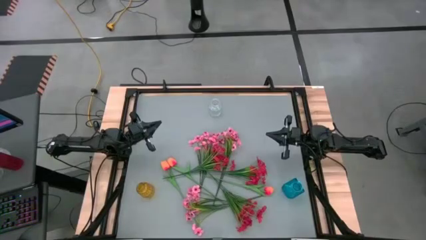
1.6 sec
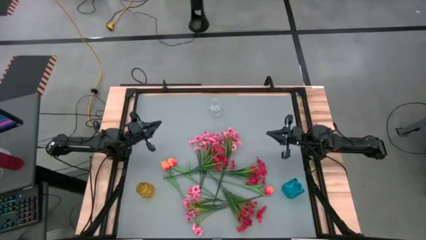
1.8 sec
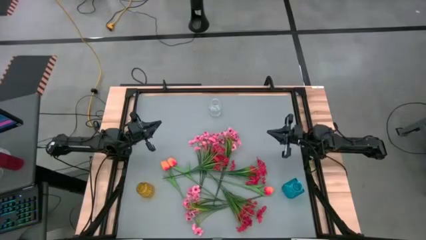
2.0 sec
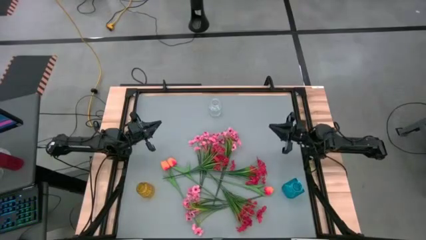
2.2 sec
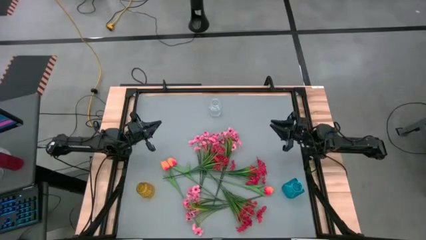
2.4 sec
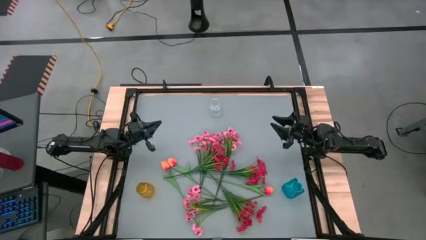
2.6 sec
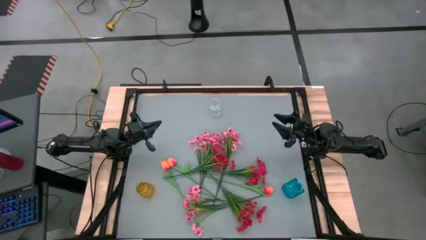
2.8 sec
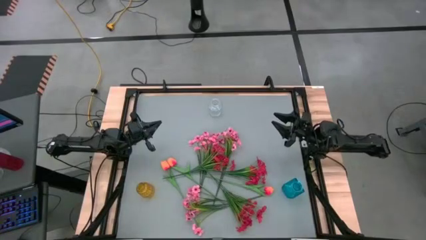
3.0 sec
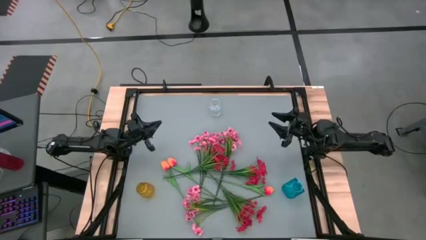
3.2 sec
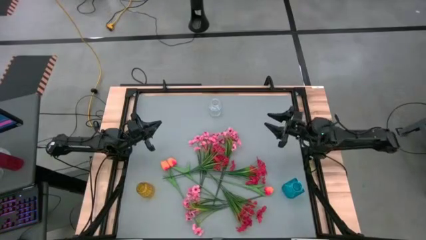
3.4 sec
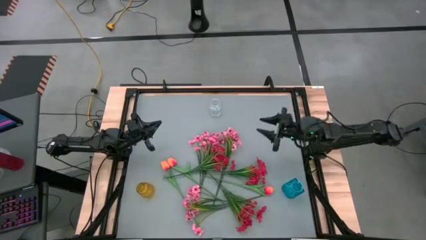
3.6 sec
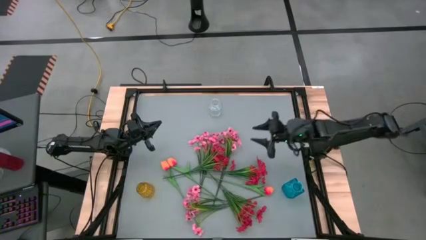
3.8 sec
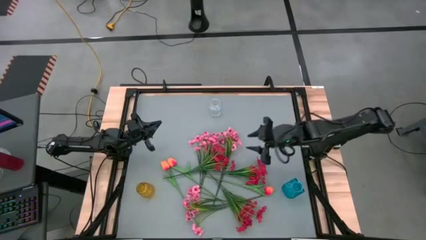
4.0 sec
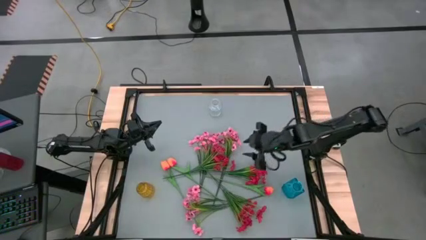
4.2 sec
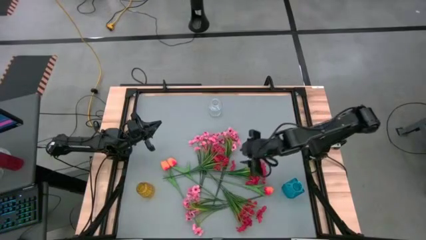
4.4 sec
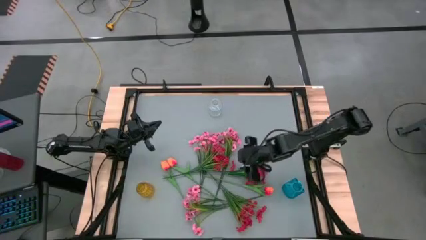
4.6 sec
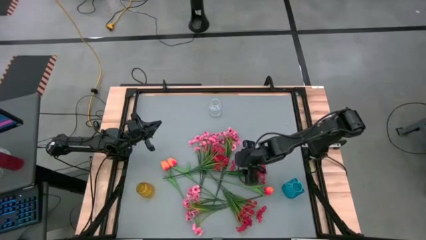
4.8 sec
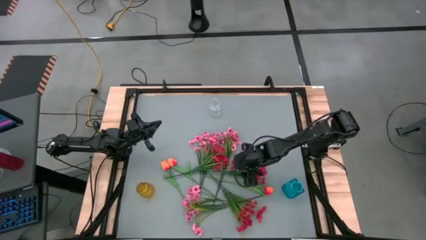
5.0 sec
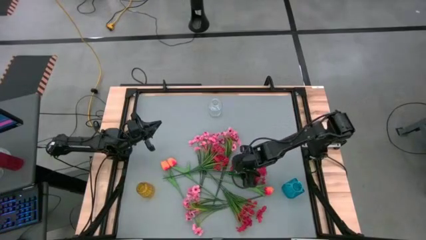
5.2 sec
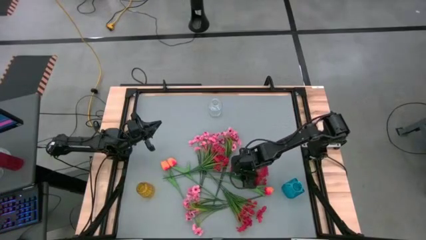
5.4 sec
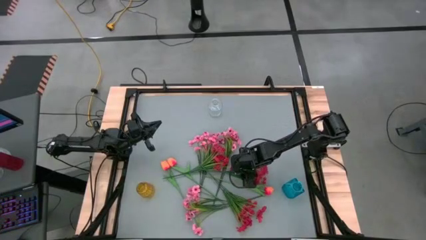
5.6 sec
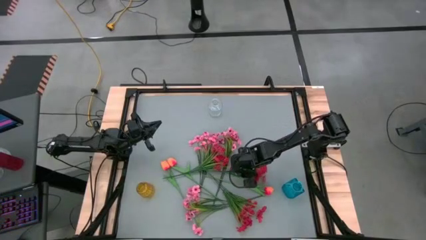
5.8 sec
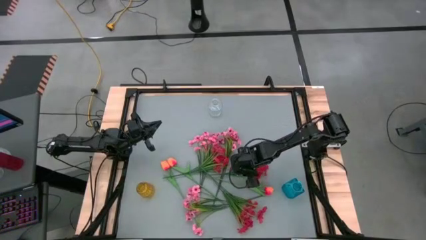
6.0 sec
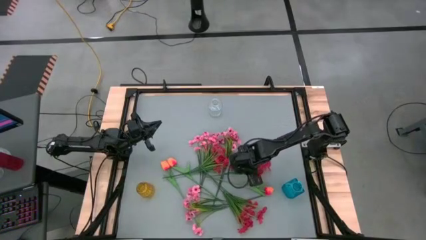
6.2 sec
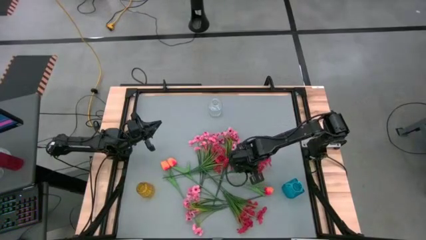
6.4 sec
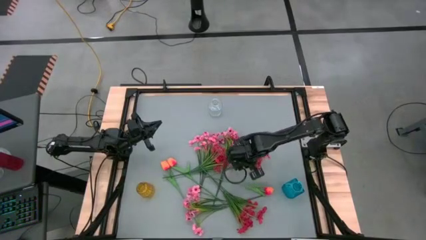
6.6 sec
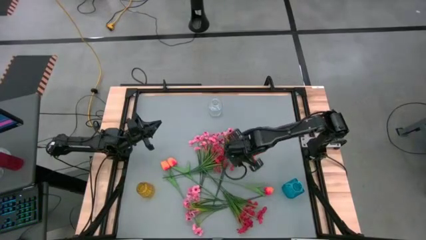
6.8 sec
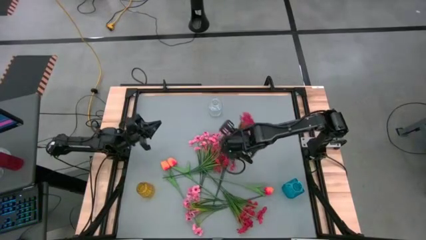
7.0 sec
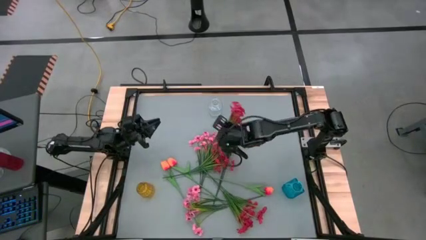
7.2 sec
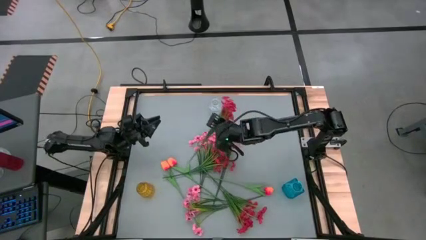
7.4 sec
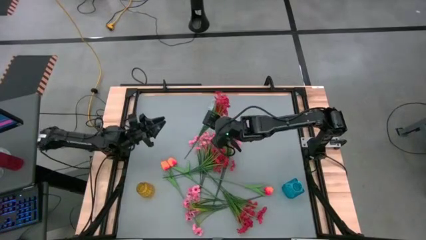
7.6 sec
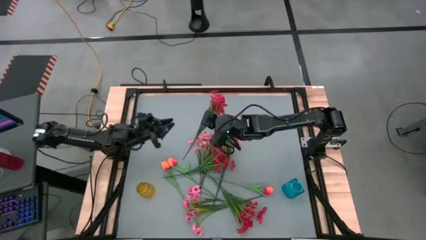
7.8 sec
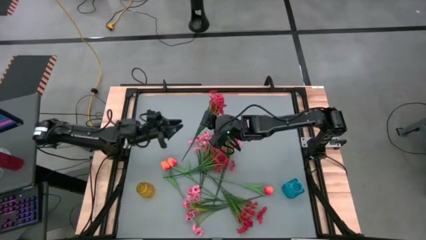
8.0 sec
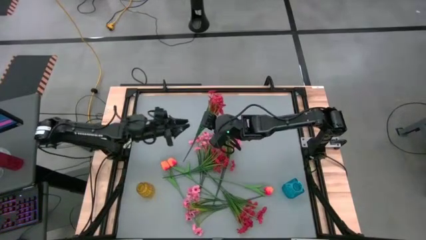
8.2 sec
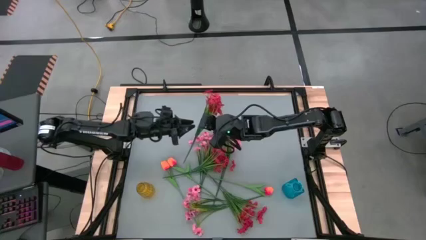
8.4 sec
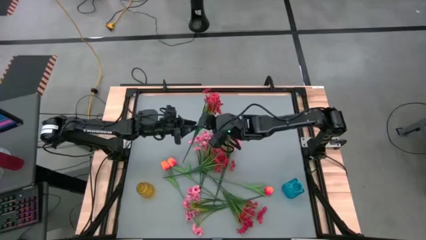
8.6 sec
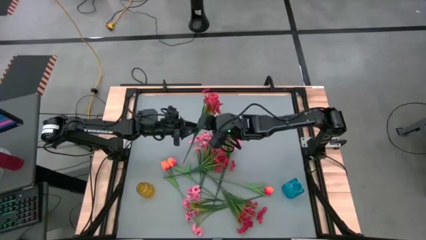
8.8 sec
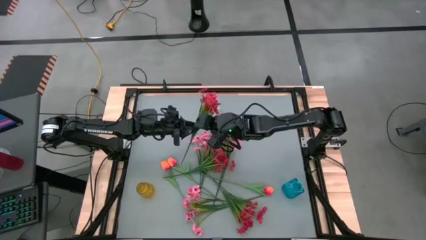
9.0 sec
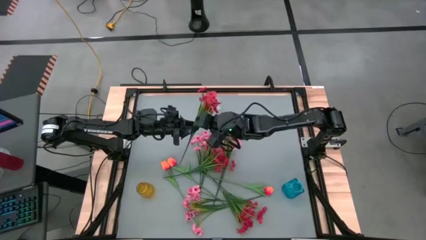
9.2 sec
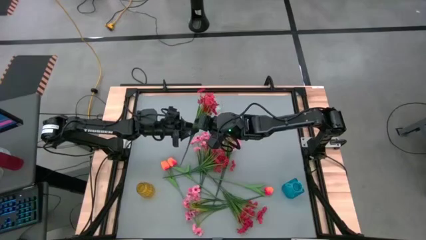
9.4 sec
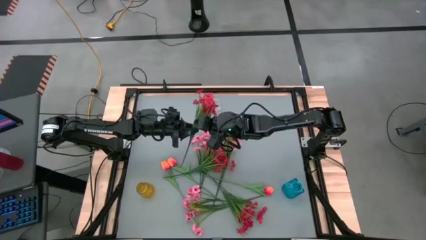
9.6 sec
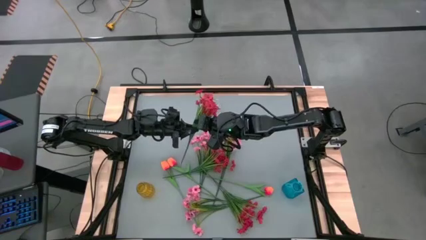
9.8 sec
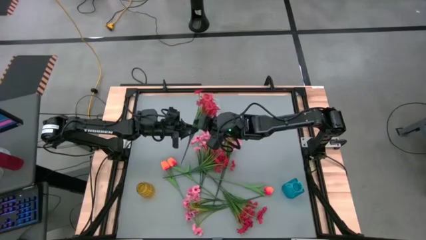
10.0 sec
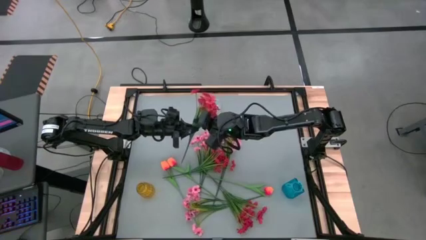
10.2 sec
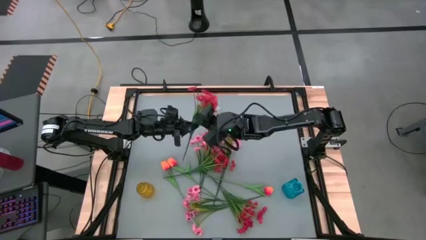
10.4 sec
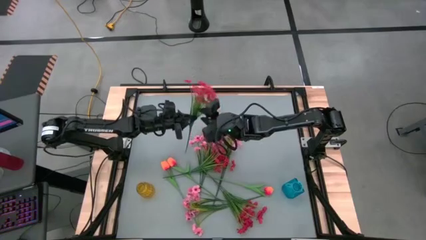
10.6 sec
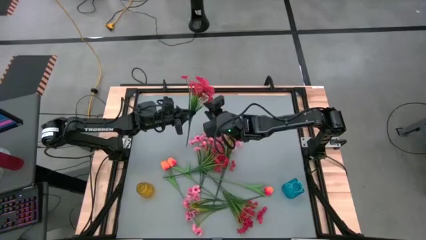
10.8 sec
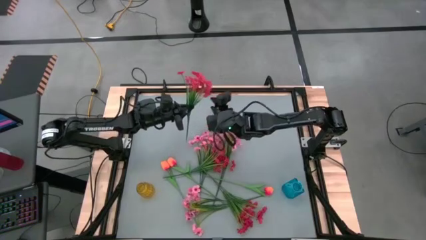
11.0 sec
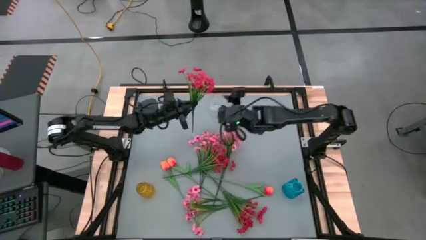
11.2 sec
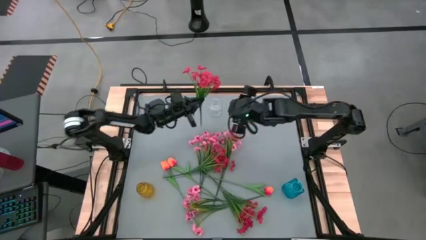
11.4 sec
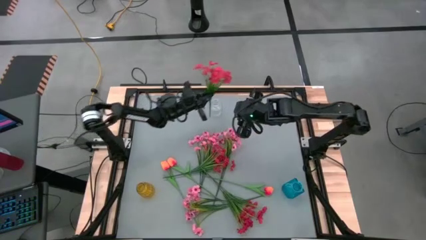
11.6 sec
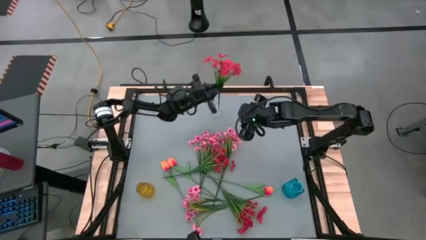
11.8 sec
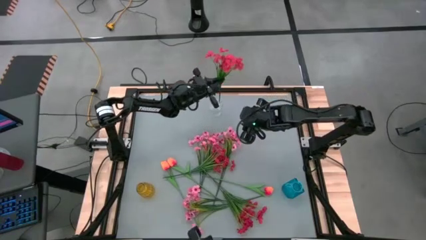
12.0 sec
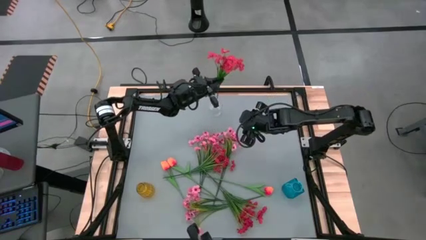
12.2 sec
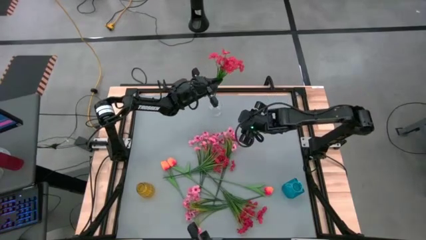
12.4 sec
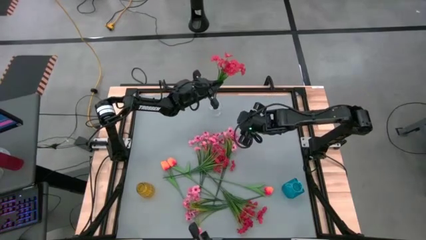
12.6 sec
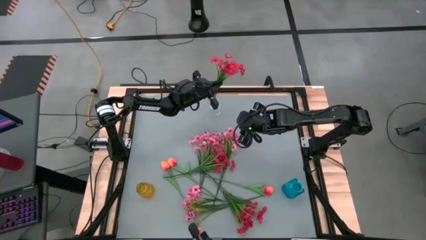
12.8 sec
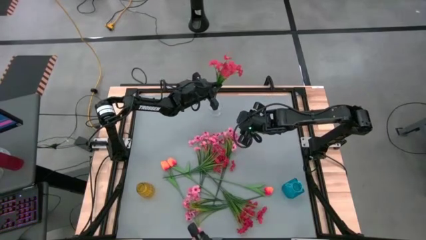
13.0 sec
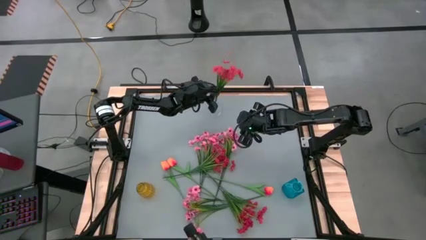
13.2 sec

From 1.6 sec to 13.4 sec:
Task: Sort flowers into vase by color
Put the top right red flowers into the transparent vase

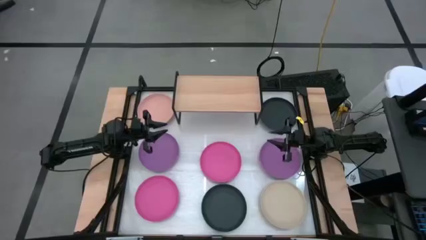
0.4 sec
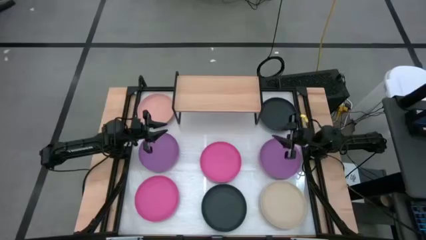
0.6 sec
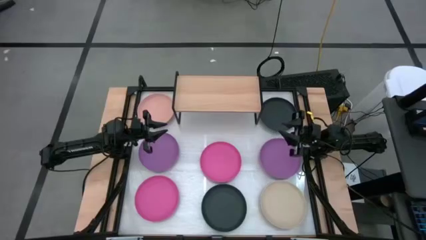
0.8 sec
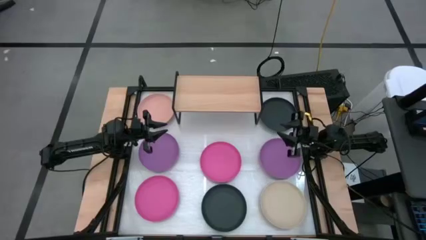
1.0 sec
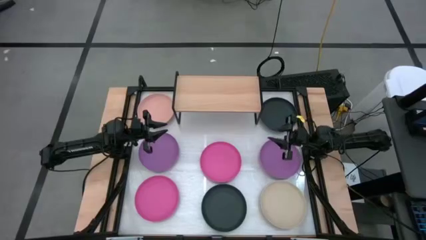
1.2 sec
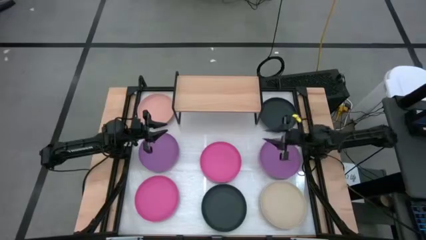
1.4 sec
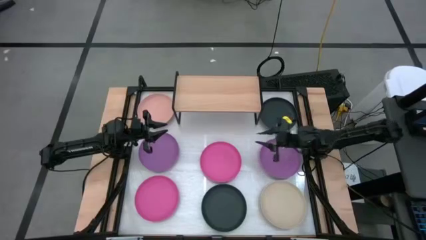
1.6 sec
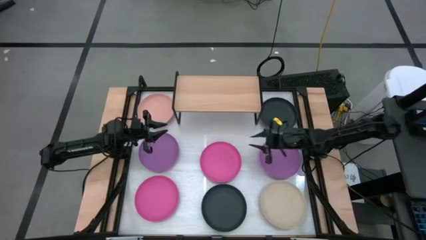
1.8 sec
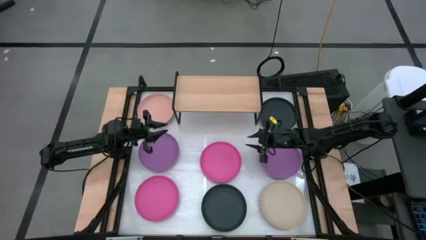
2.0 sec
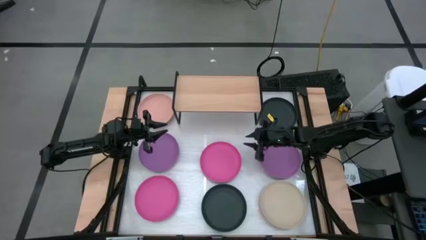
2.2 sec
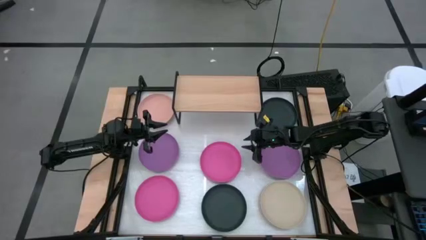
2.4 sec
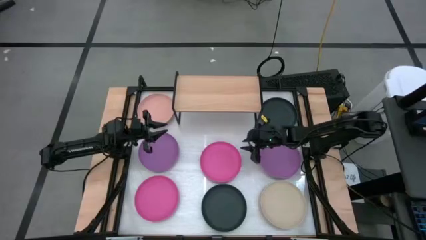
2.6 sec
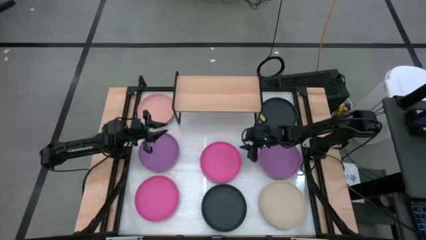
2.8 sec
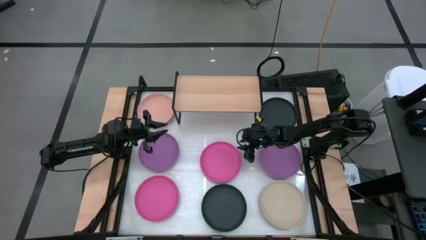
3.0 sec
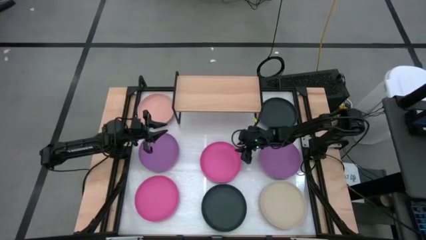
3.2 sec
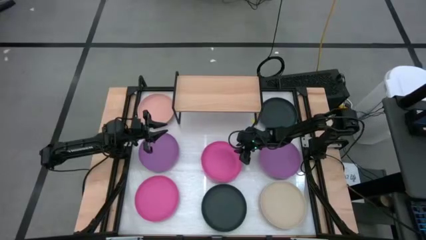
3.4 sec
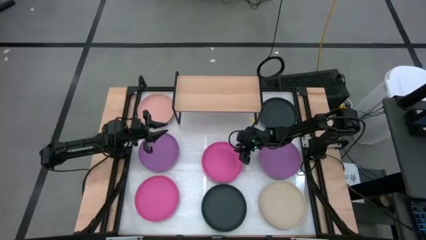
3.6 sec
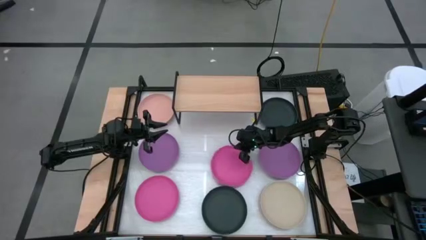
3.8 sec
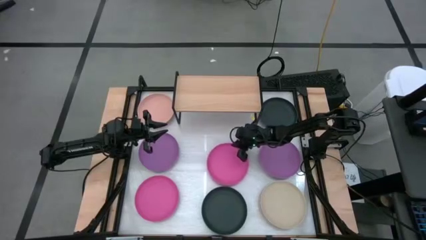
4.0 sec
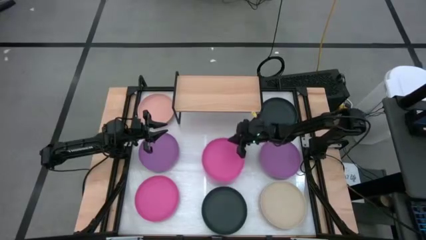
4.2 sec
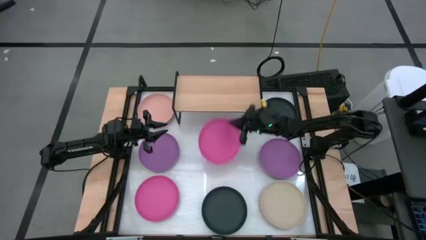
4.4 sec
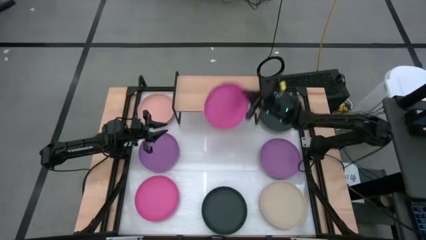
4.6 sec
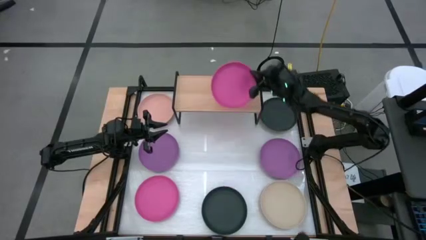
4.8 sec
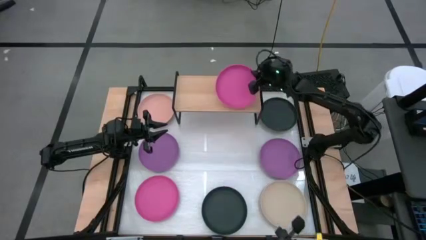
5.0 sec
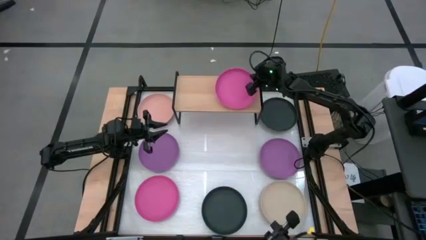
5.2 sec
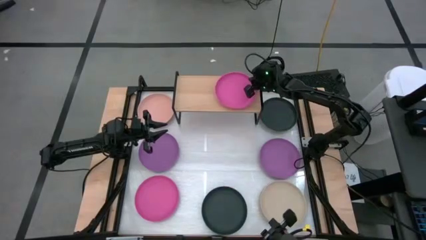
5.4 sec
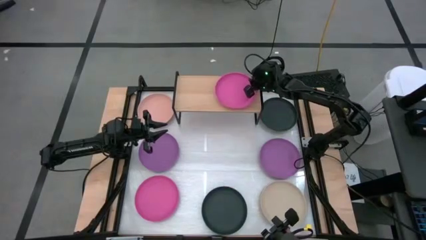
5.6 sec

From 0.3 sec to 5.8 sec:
Task: Place and stack plates onto a shelf
Put the top pink plate on the shelf
